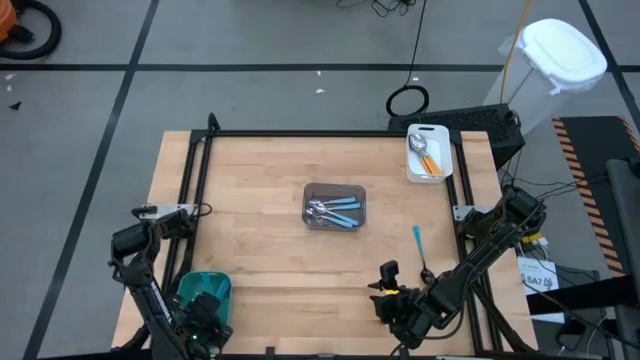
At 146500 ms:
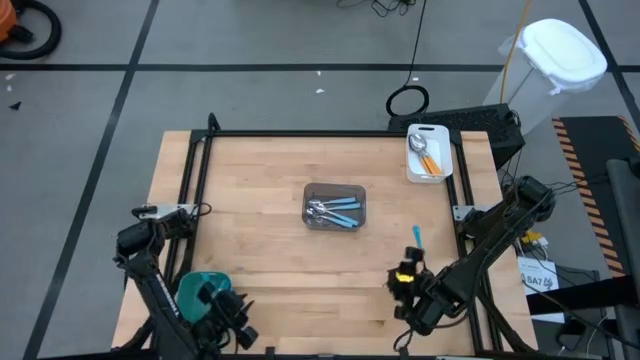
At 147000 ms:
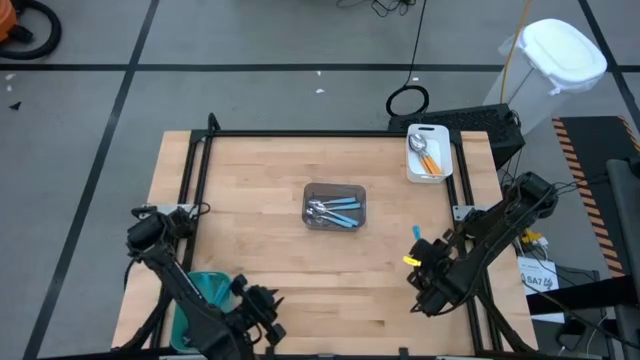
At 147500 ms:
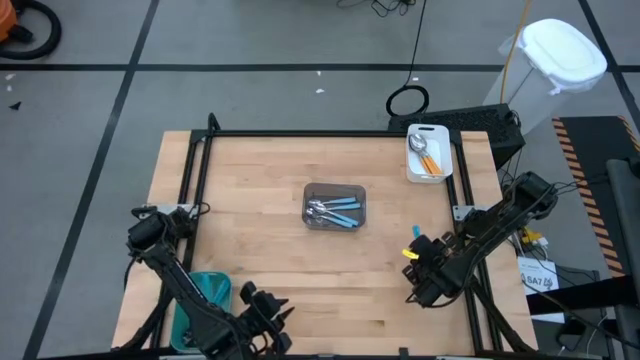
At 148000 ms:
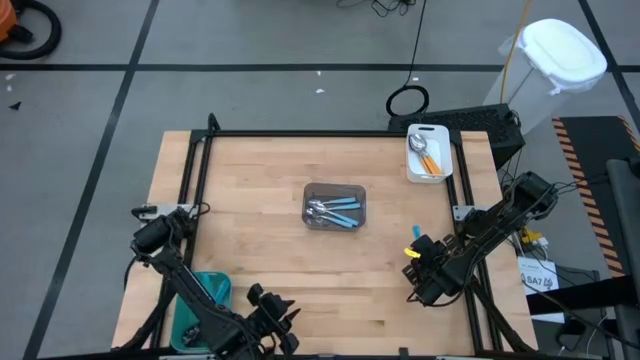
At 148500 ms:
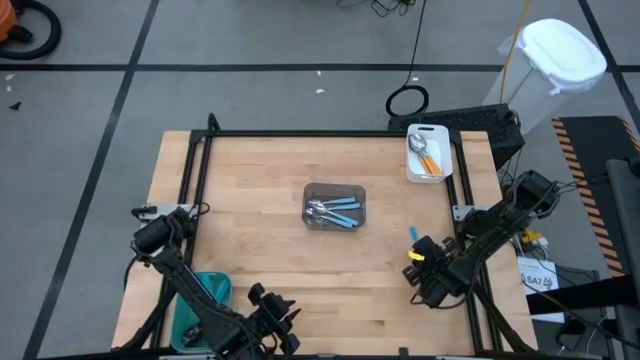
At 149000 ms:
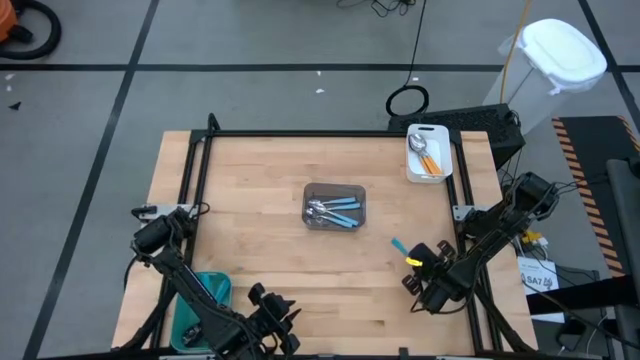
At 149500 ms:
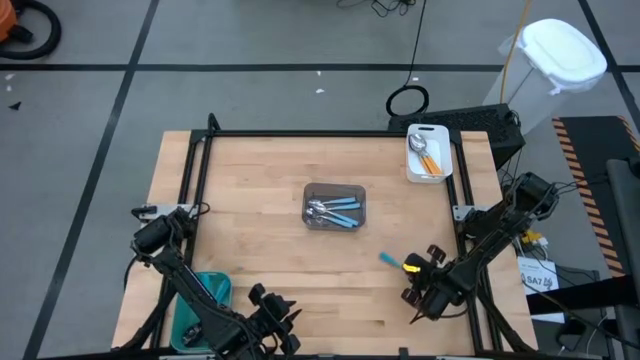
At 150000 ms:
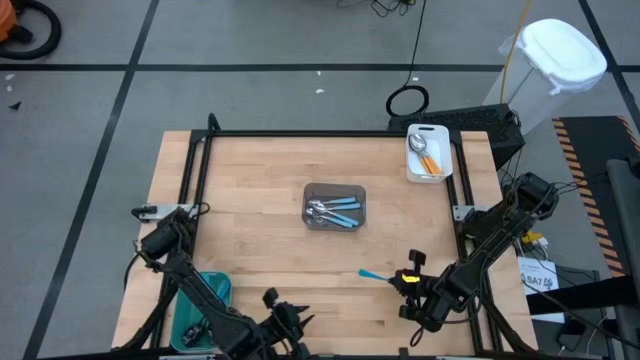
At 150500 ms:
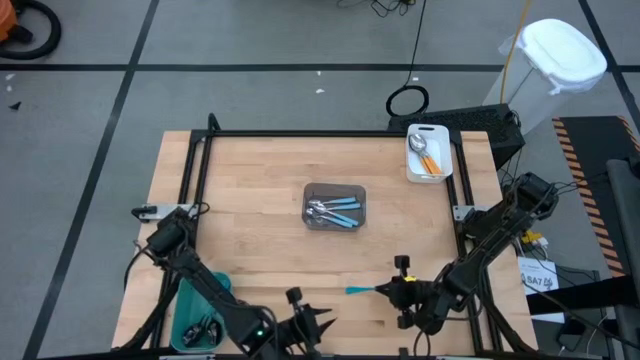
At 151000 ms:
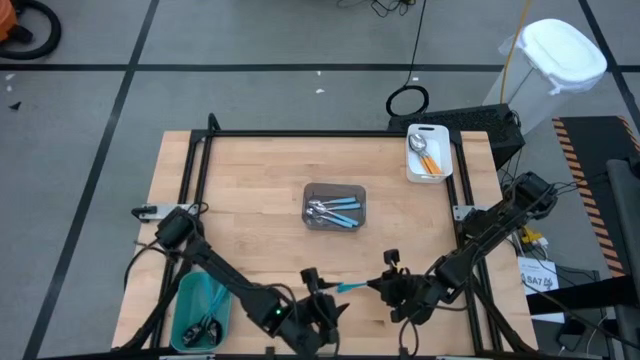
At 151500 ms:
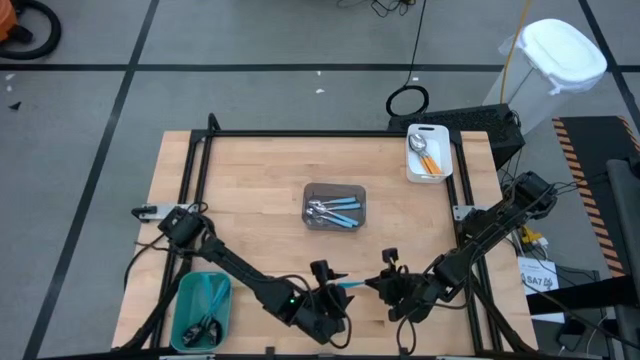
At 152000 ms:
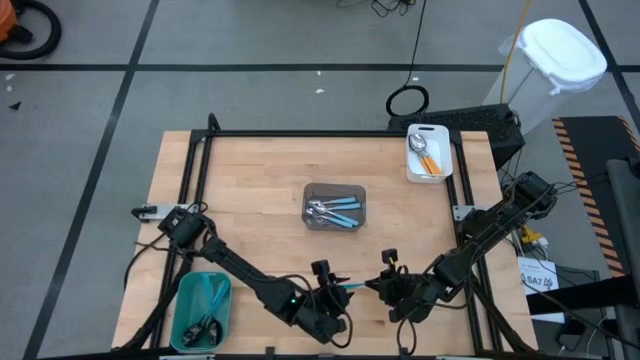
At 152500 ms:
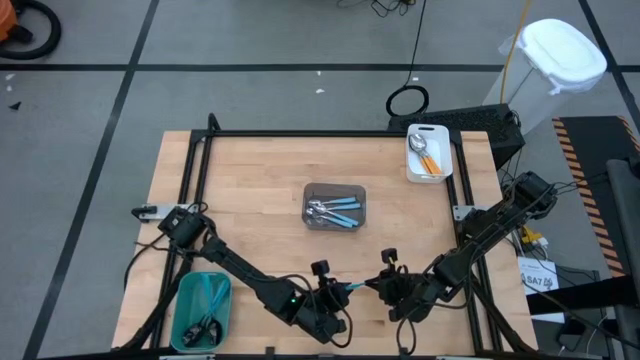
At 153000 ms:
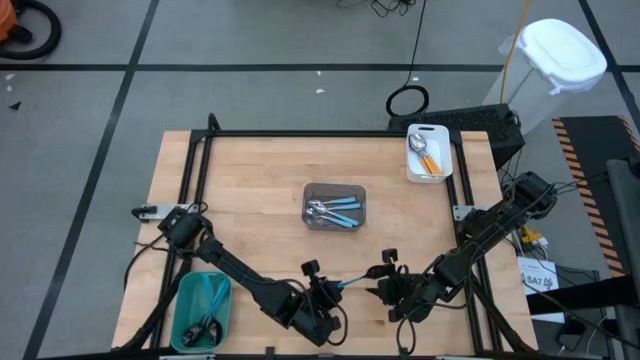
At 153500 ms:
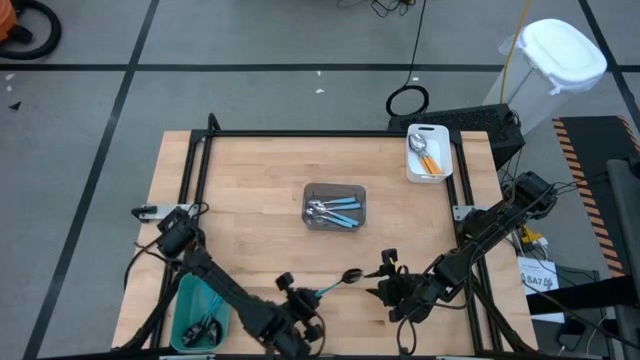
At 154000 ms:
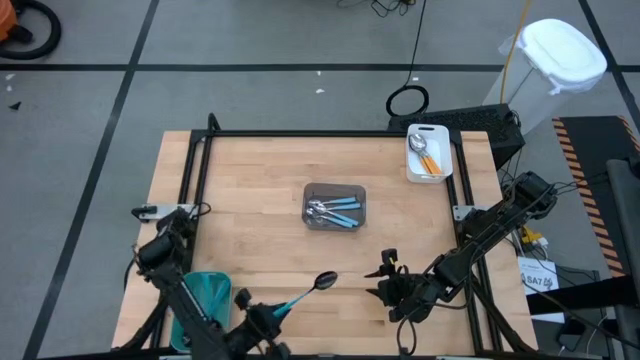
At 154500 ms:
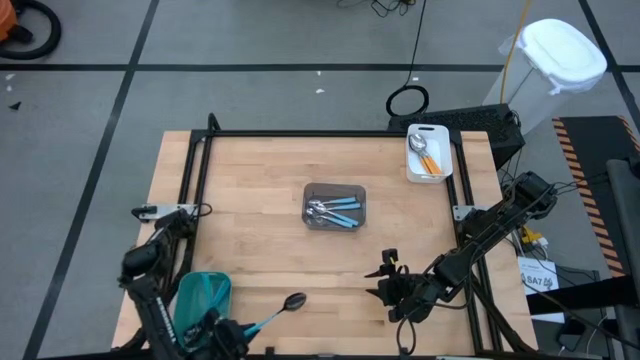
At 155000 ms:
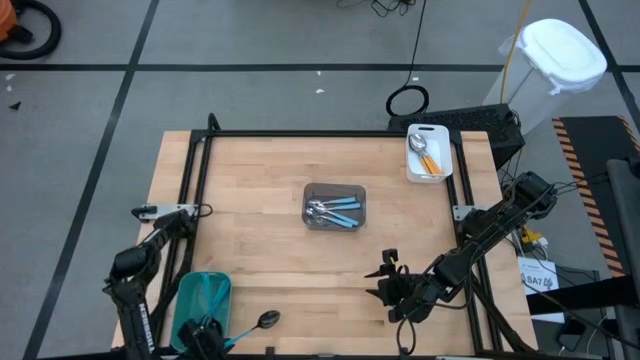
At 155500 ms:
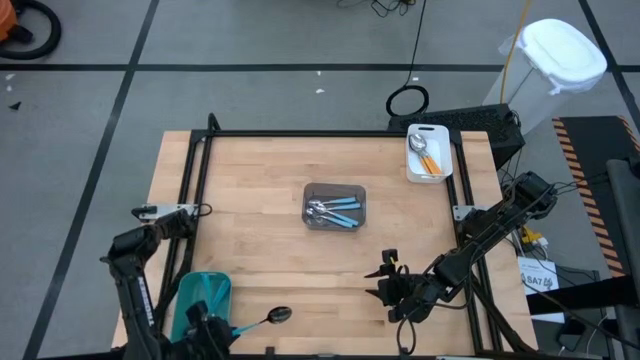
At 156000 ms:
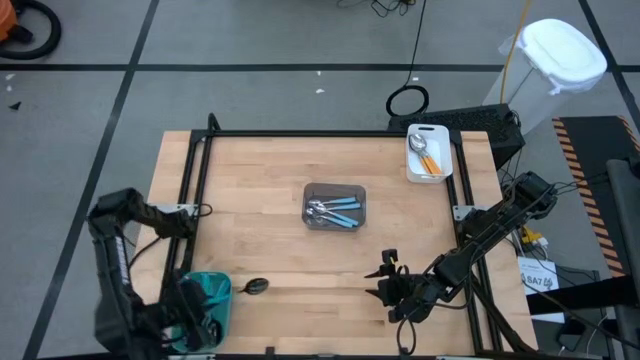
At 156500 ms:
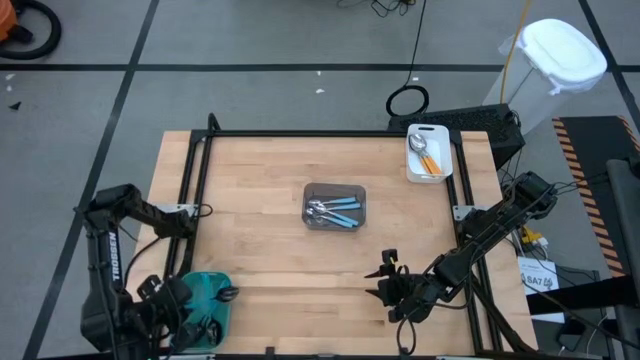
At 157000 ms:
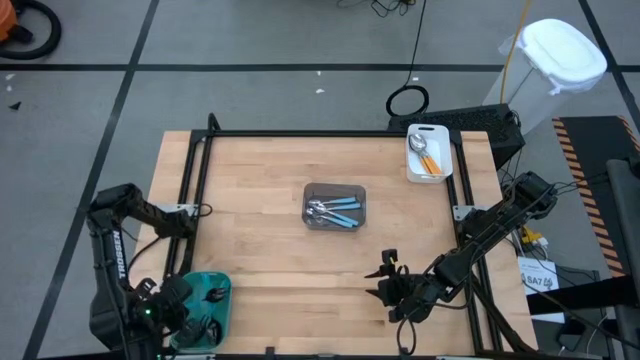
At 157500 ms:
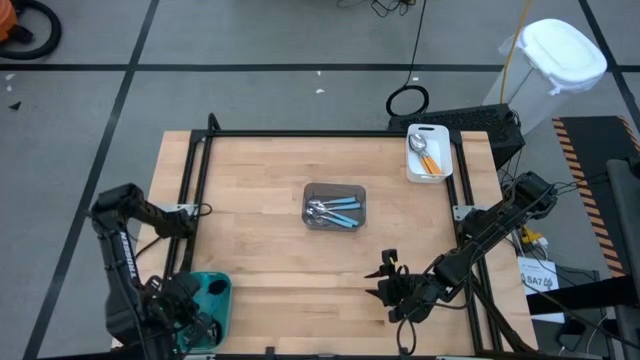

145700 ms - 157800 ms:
Task: Sort silverware by color (type)
Put the dark blue spoon into the blue bin

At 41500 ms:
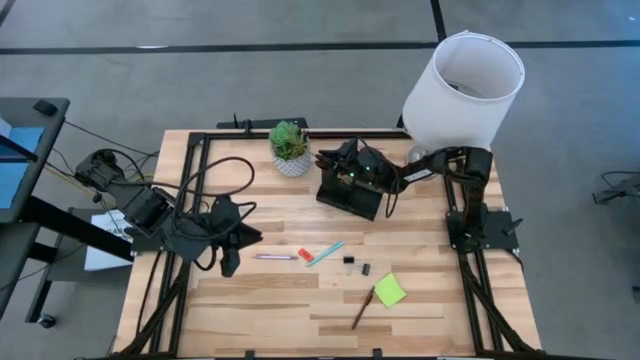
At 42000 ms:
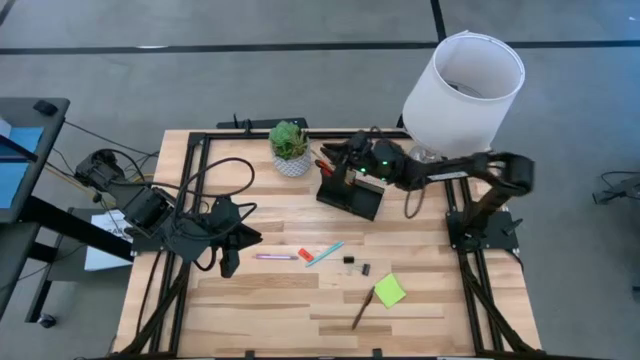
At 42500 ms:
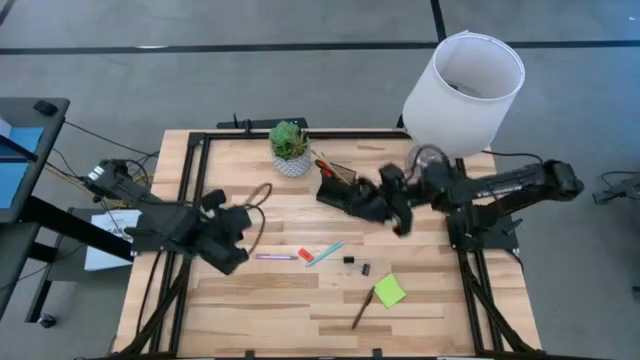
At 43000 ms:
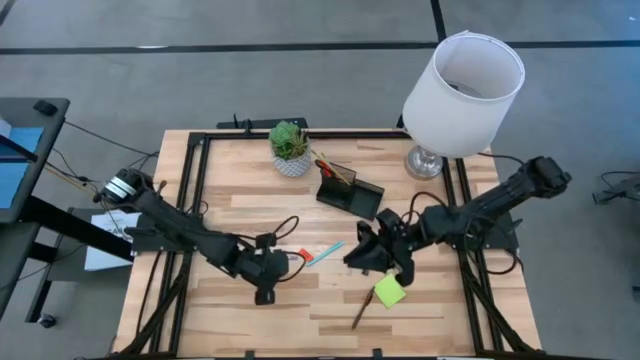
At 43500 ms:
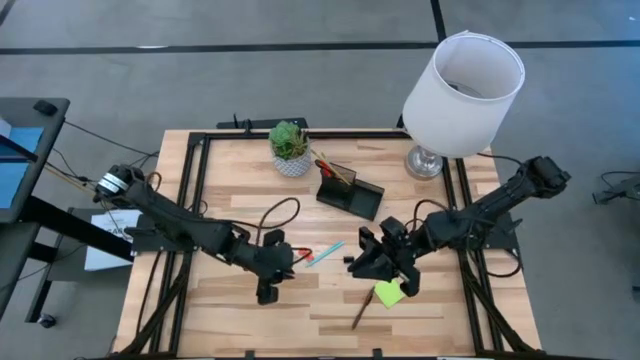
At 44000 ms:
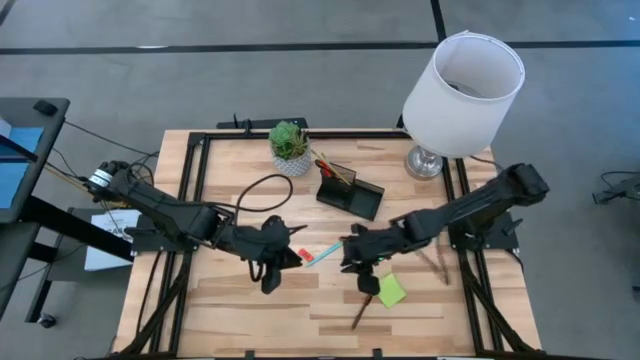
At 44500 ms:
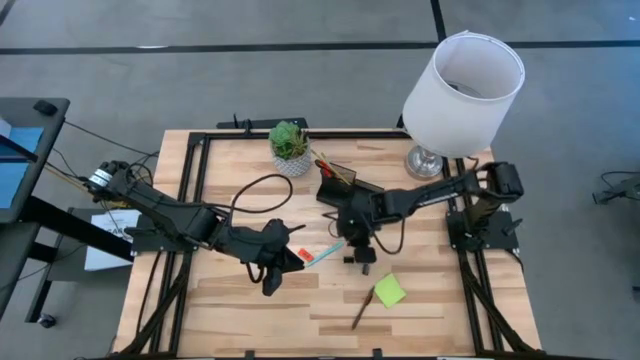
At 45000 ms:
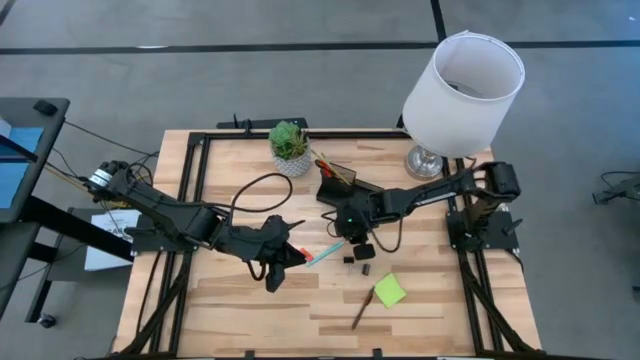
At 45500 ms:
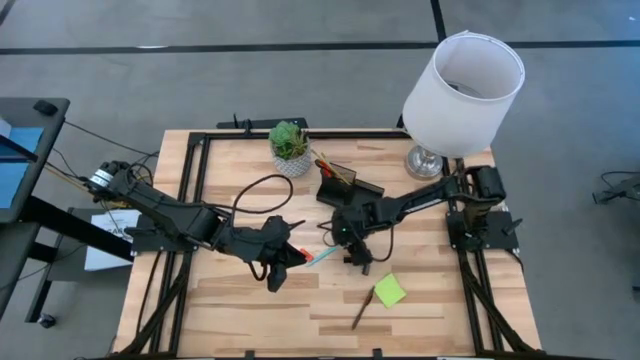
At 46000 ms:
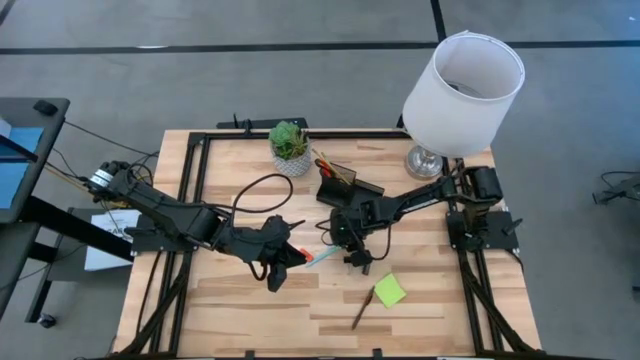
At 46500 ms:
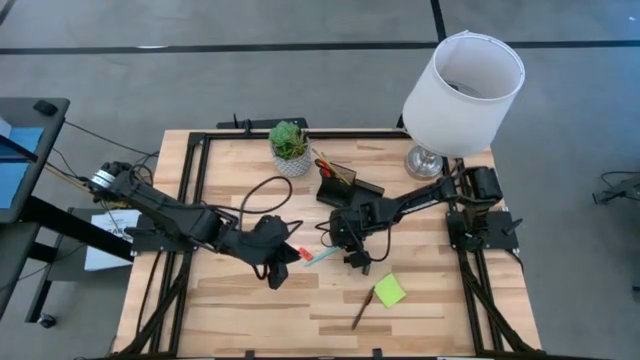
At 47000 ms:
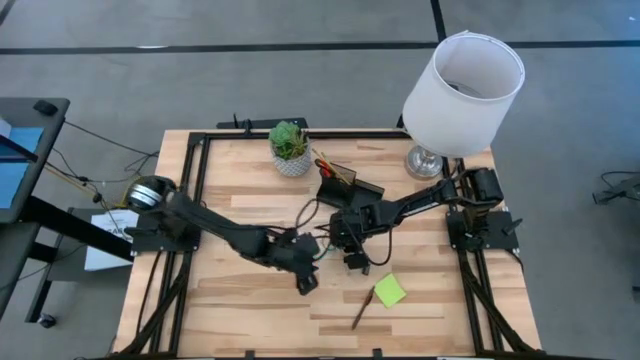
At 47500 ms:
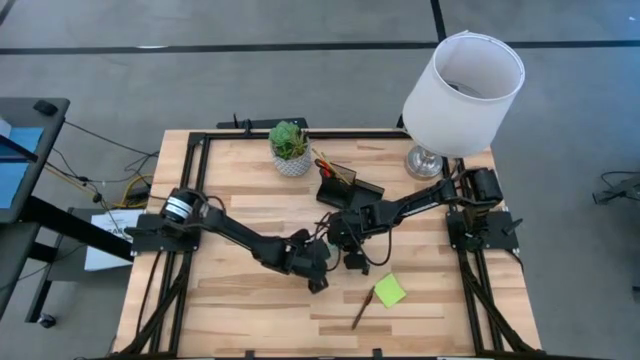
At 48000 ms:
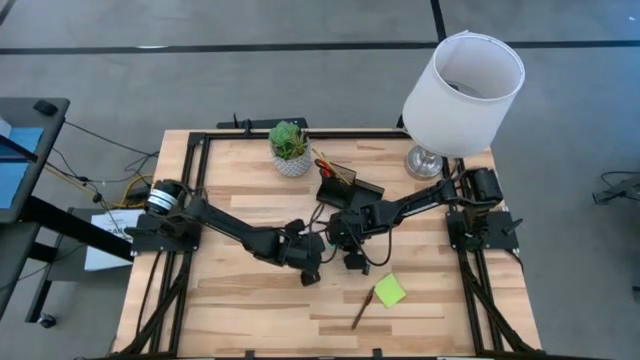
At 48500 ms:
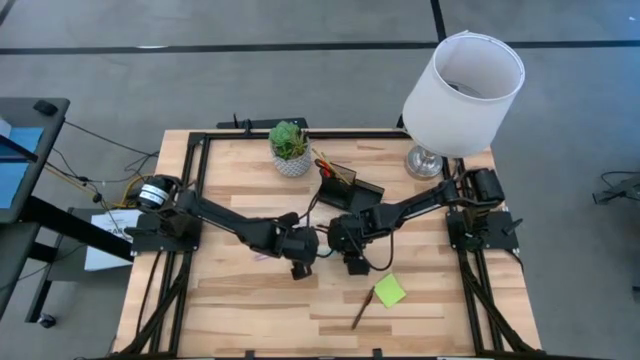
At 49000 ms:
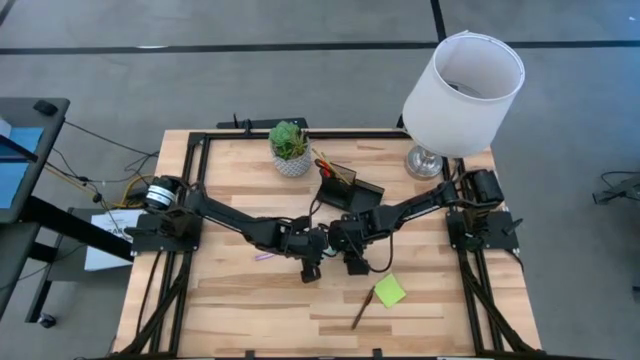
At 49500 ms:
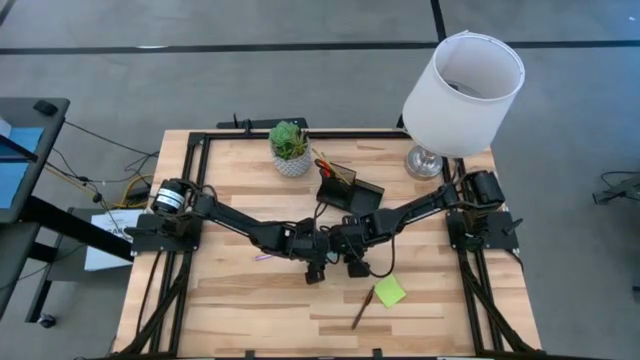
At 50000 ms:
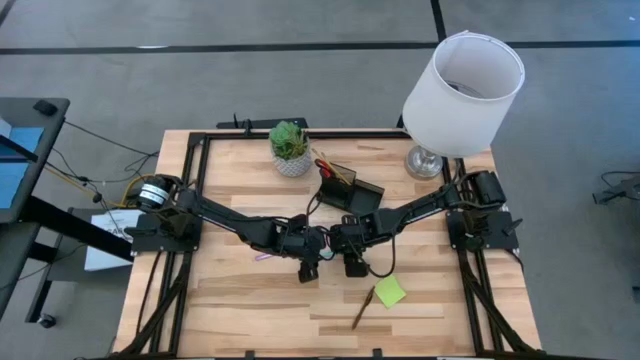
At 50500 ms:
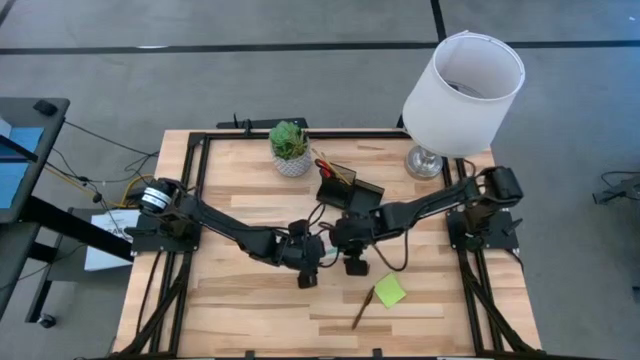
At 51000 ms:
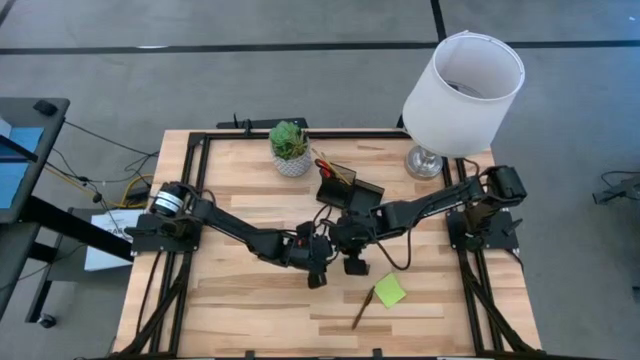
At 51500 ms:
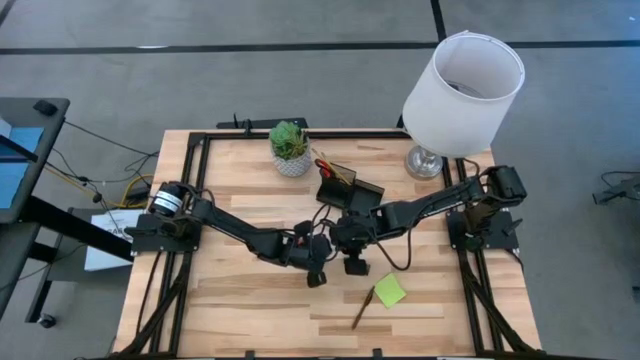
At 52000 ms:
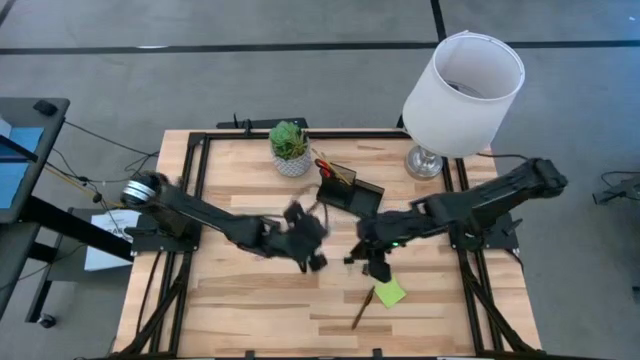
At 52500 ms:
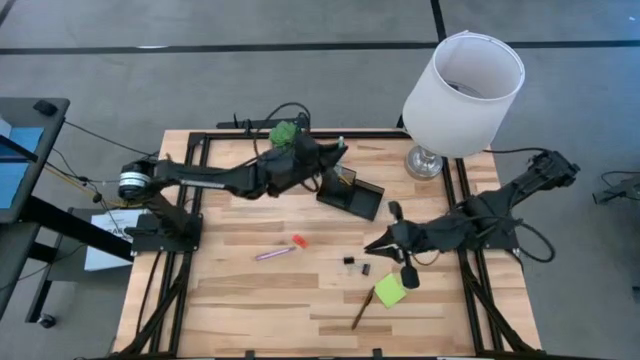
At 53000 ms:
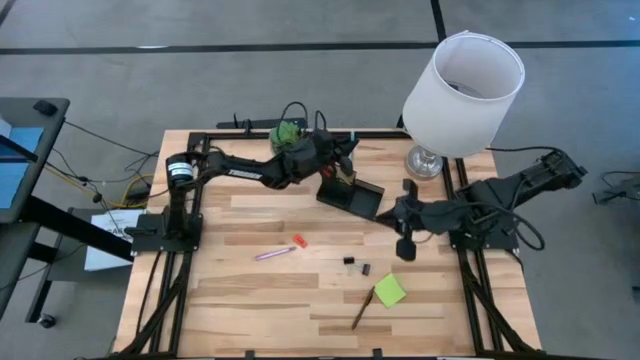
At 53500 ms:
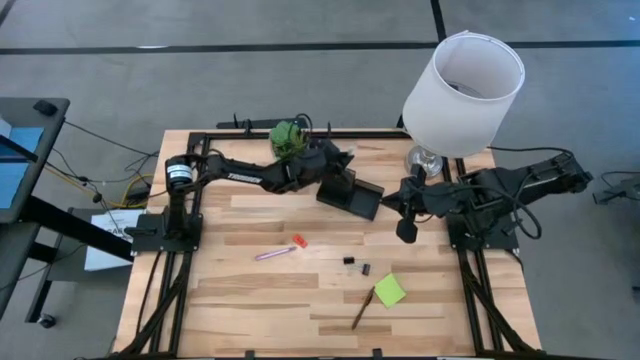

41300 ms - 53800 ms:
Task: Pick and place office supplies into organizer
Put the blue pen into the black desk organizer
